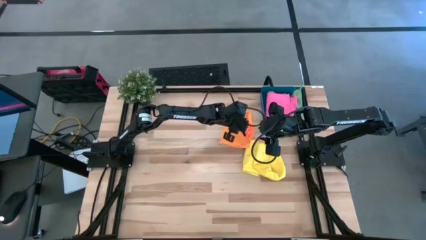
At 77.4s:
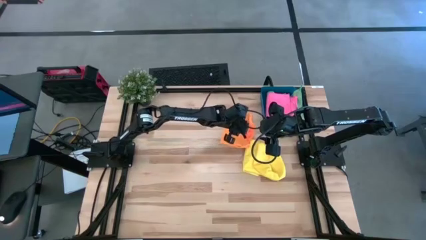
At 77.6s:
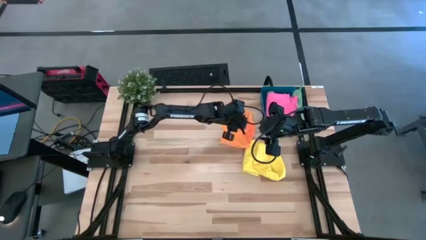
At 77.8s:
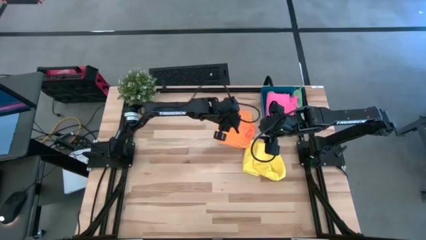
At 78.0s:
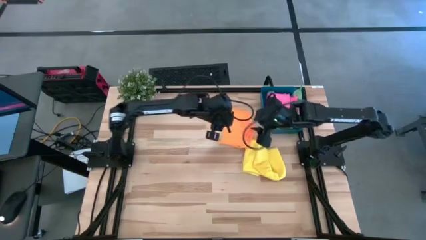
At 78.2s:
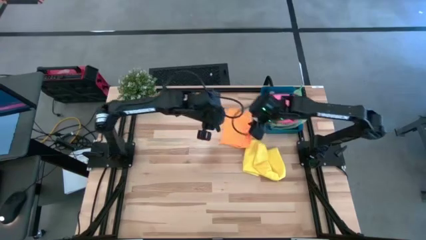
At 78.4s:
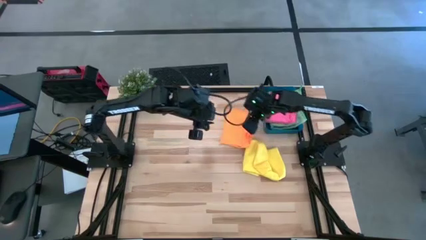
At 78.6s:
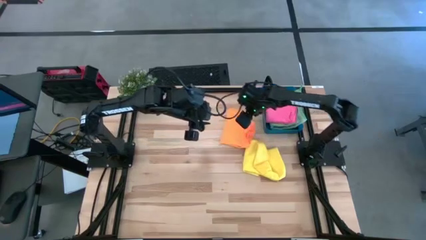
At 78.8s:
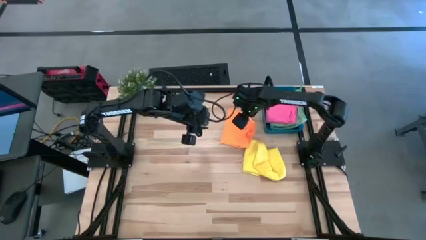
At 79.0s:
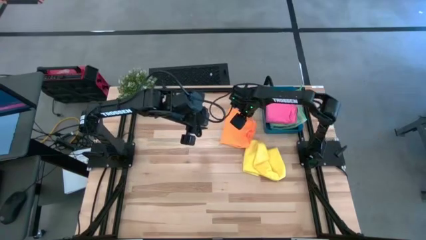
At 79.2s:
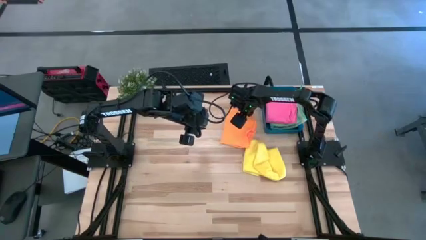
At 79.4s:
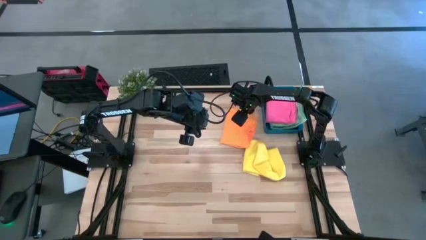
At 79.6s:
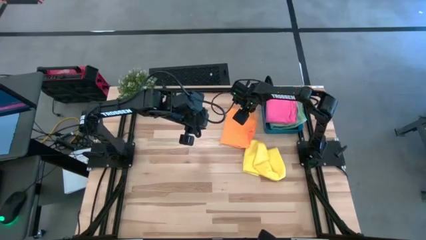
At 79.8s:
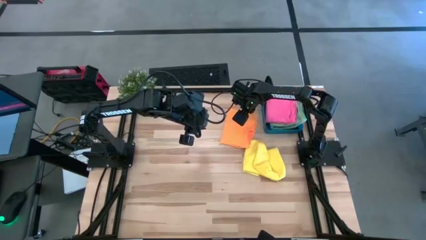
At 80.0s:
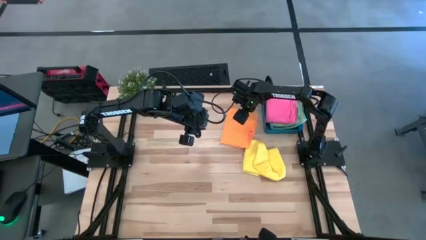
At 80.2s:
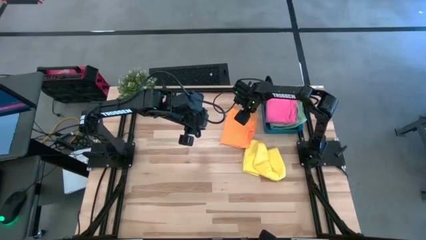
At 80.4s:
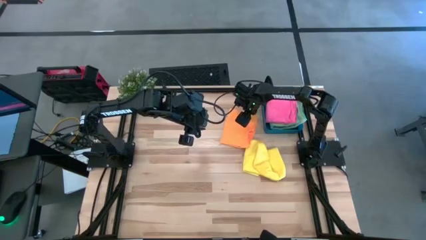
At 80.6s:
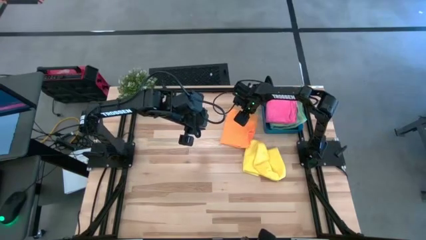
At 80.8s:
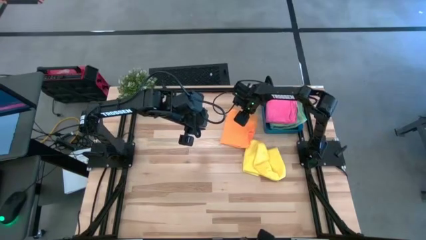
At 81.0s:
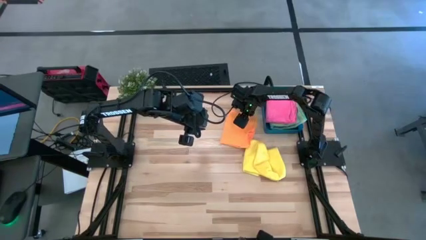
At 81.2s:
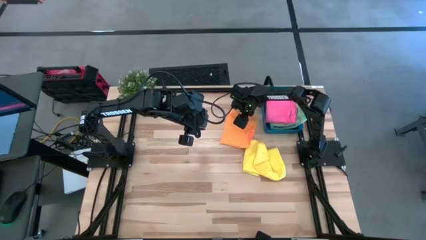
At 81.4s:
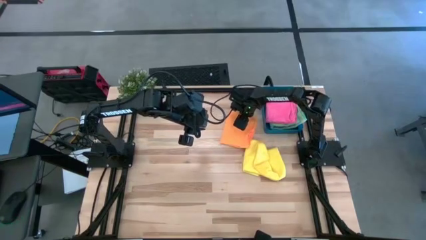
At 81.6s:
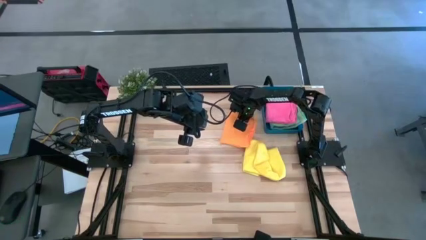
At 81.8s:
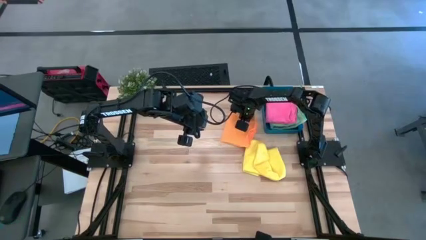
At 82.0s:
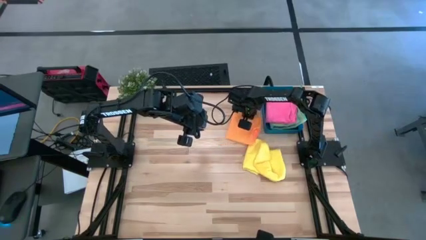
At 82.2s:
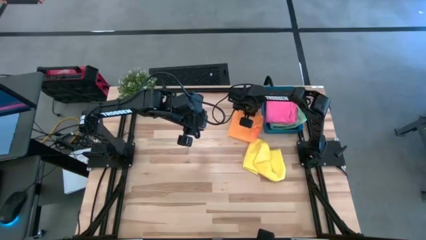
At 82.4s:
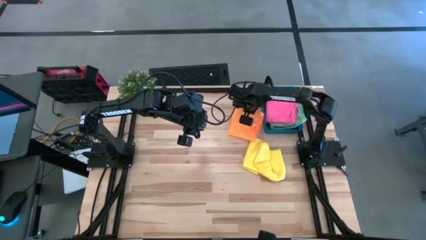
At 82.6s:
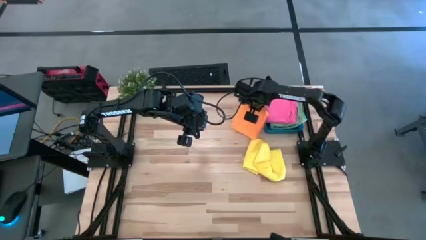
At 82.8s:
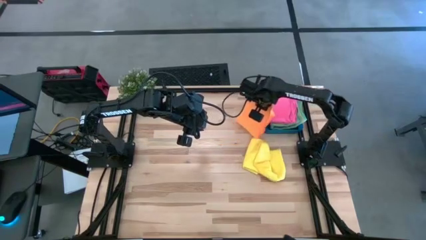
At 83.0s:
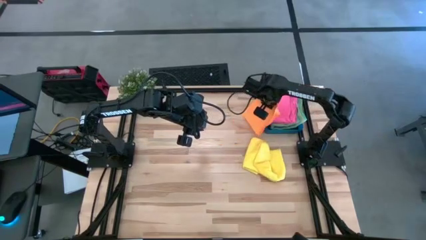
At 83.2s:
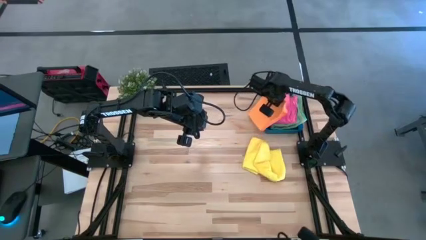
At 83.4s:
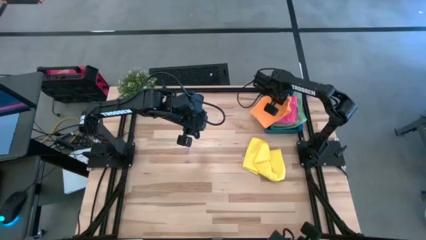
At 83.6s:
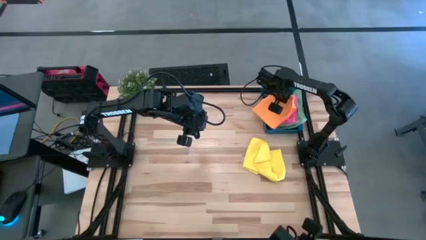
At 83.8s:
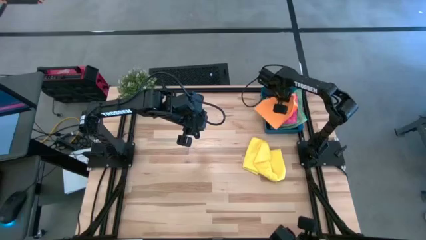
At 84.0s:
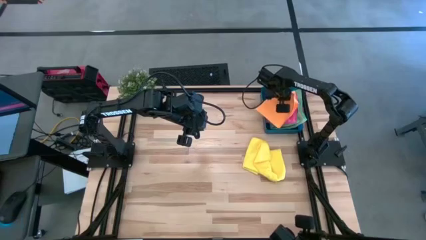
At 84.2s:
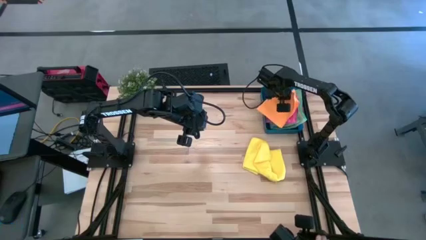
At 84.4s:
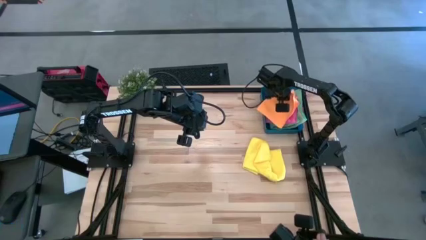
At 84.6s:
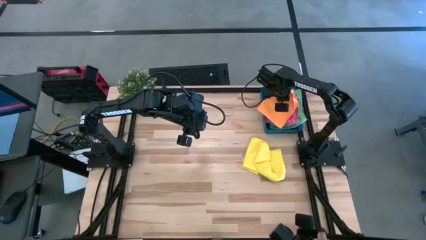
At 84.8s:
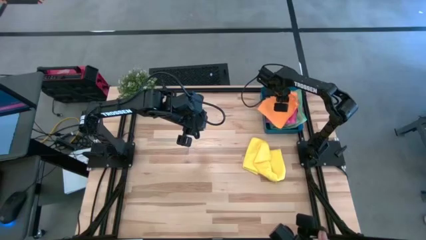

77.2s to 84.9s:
Task: Fold microfiber towels
Put the orange folded microfiber towel into the bin

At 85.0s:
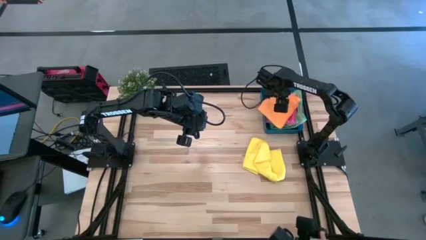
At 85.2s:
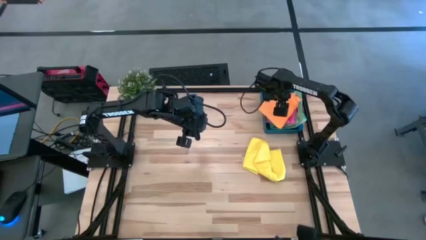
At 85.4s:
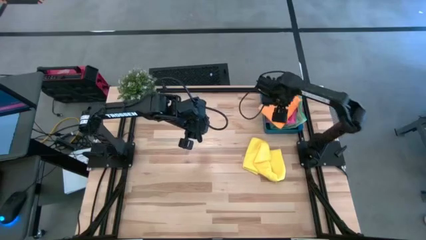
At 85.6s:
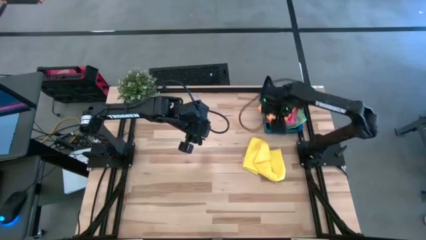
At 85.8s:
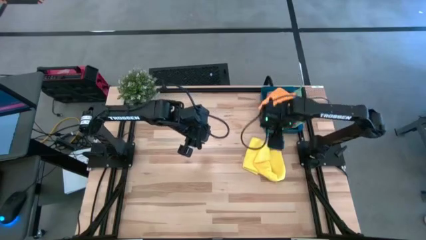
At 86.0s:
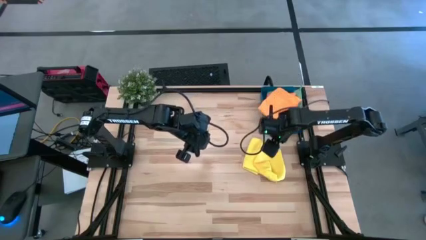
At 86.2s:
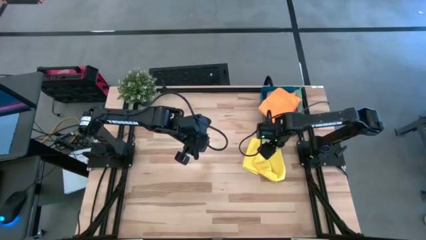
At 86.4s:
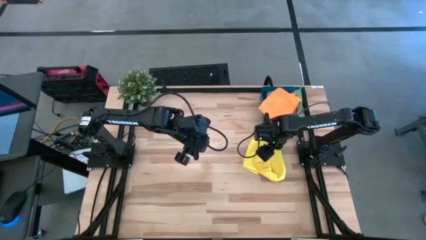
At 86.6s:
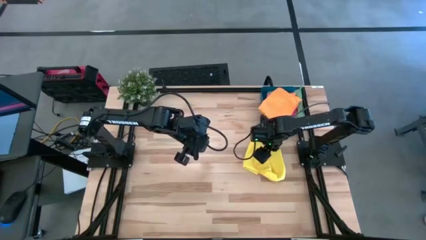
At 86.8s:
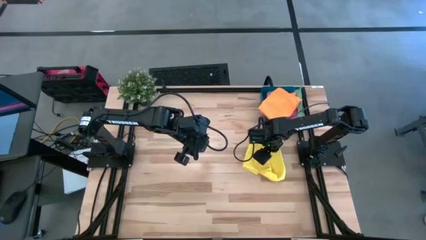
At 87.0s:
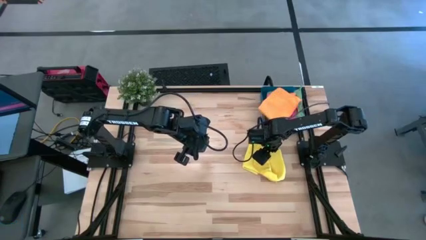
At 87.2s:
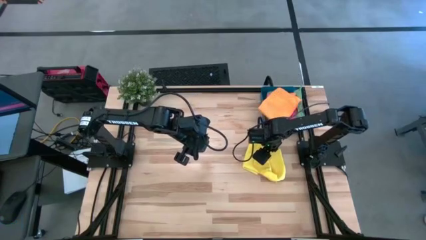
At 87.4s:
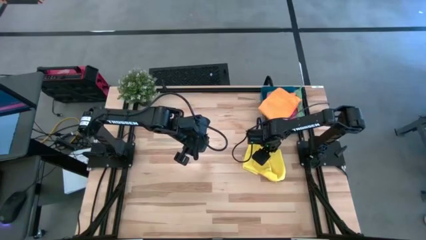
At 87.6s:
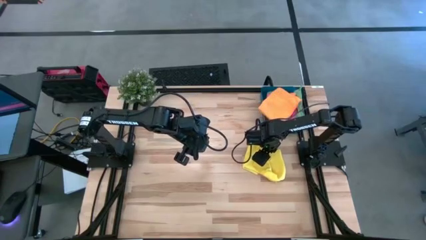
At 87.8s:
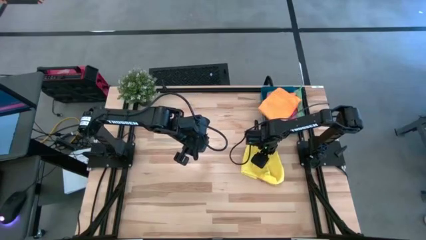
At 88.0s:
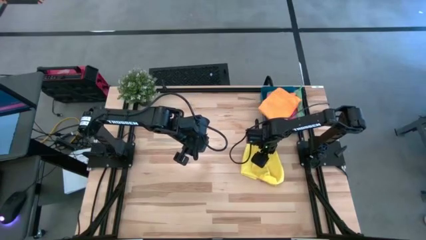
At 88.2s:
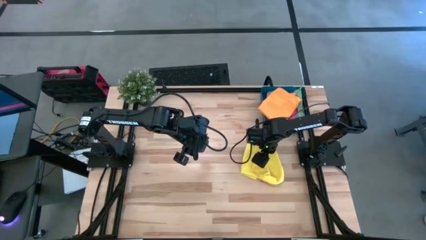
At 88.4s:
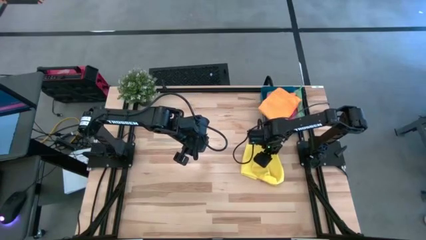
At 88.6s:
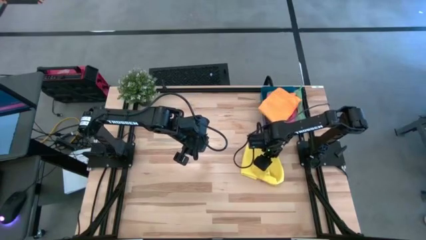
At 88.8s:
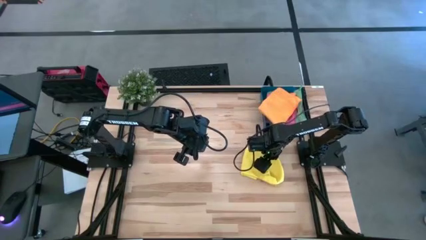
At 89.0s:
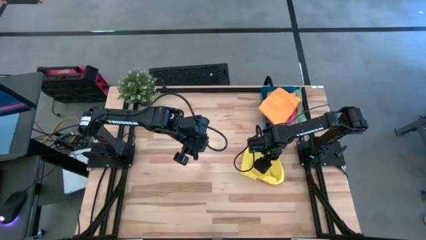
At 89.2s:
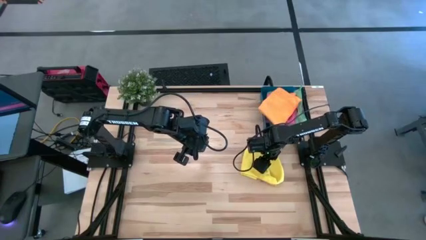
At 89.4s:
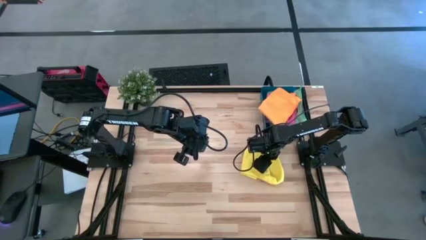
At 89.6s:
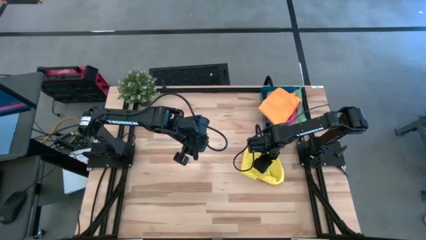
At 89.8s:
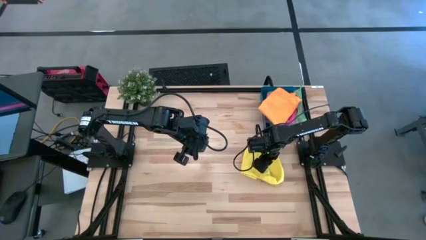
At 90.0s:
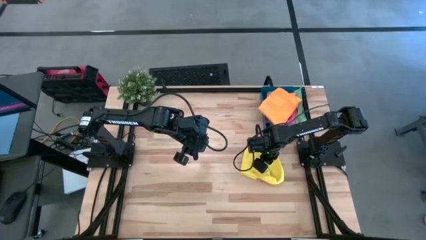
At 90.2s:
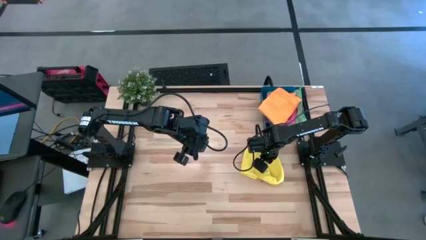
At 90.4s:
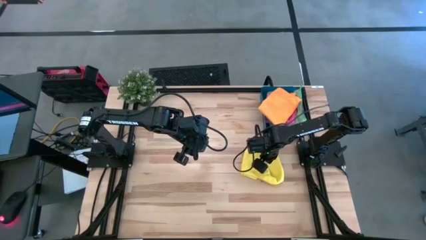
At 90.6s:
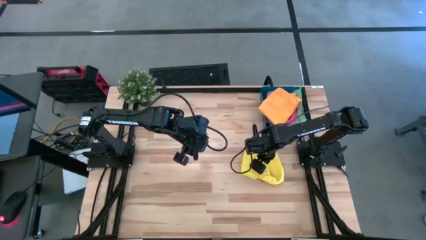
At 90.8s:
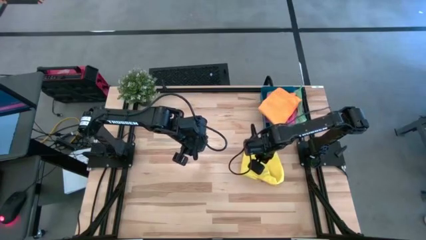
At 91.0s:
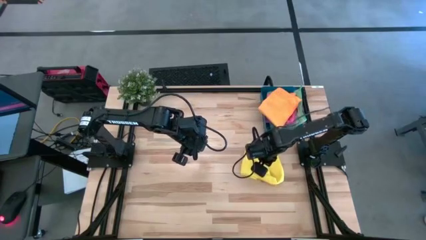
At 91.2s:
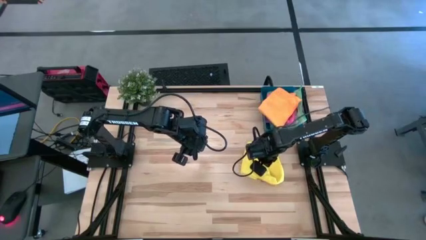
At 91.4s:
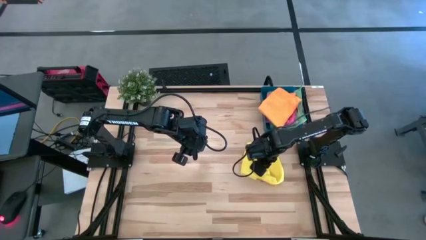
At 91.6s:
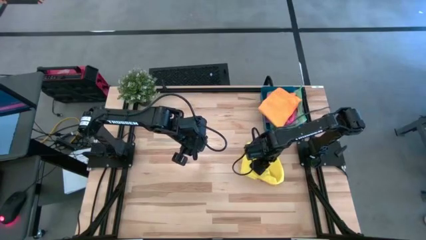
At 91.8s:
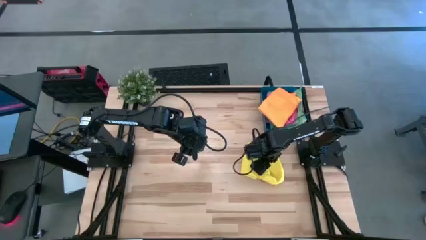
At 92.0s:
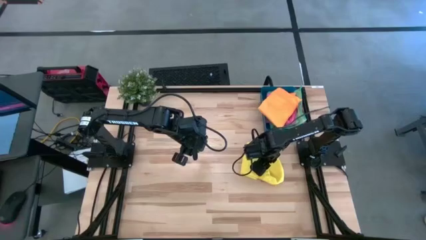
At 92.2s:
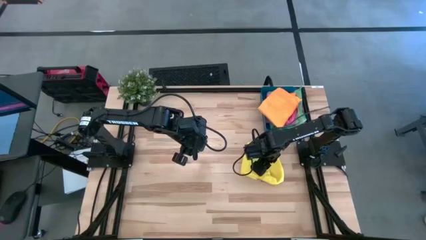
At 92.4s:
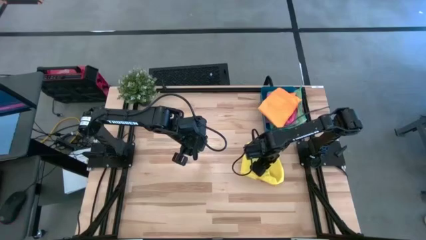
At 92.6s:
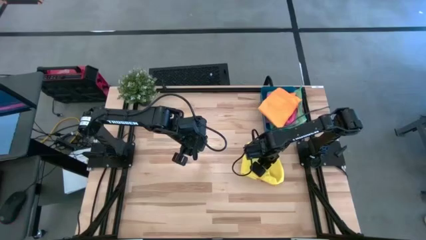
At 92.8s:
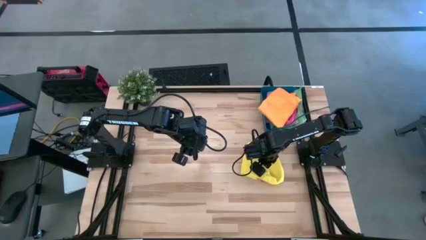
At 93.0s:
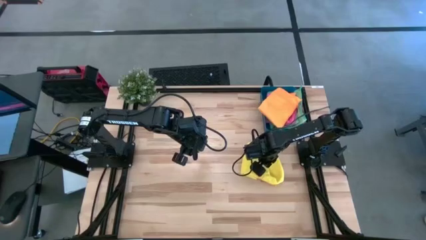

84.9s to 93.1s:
Fold the yellow microfiber towel on the table
